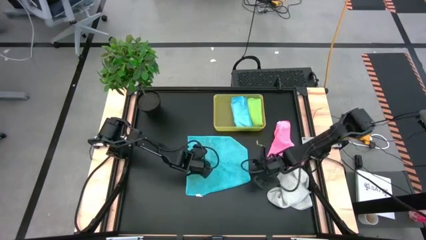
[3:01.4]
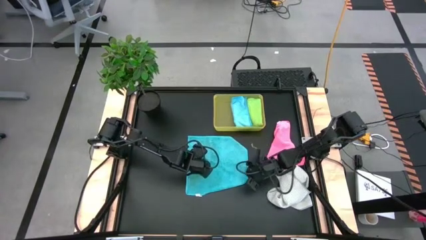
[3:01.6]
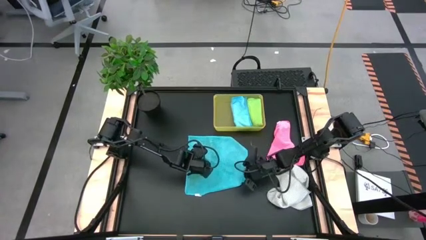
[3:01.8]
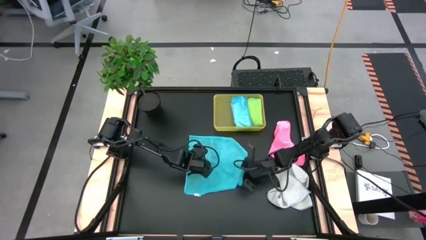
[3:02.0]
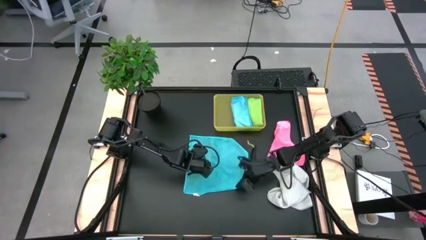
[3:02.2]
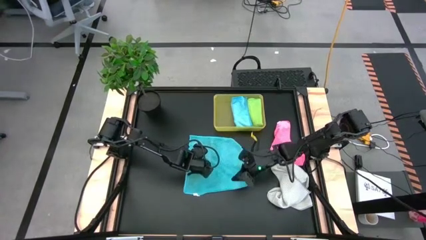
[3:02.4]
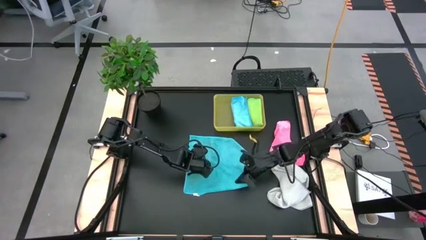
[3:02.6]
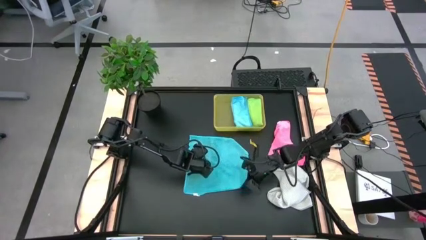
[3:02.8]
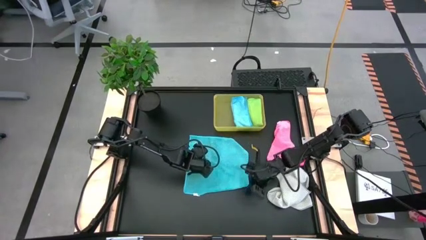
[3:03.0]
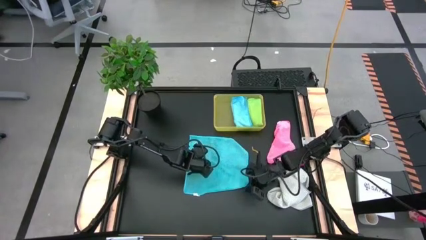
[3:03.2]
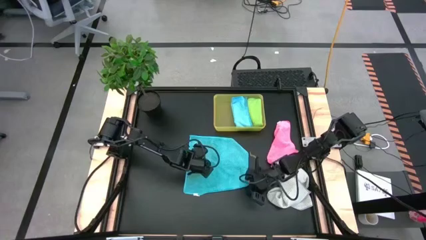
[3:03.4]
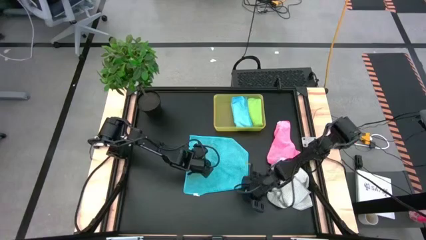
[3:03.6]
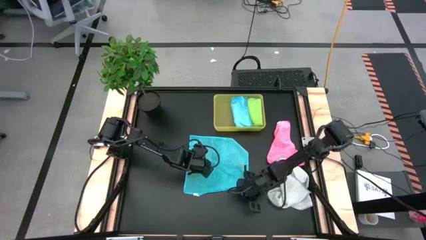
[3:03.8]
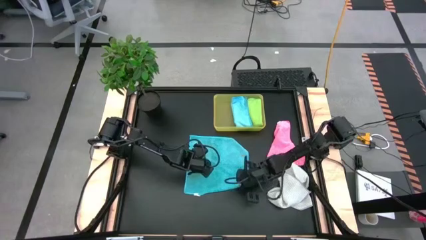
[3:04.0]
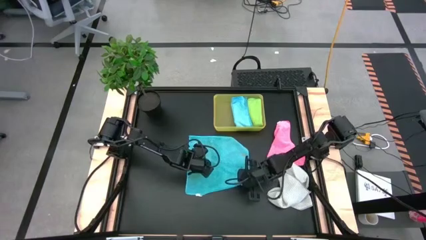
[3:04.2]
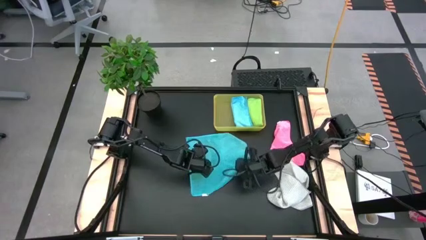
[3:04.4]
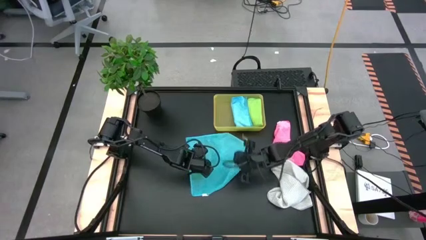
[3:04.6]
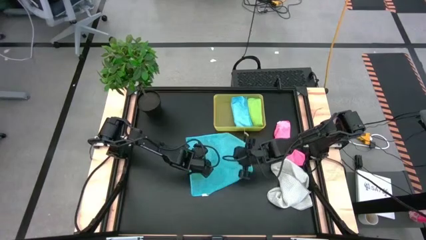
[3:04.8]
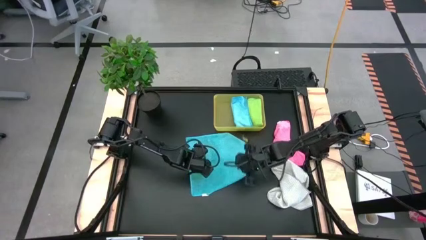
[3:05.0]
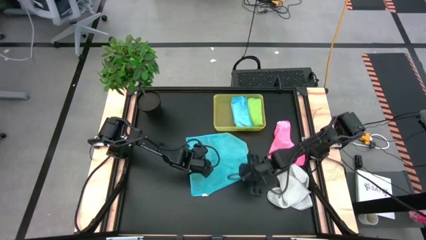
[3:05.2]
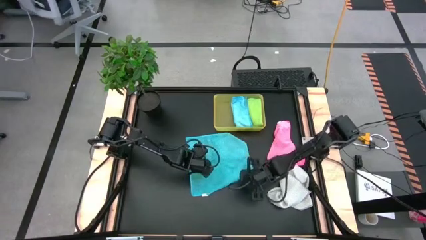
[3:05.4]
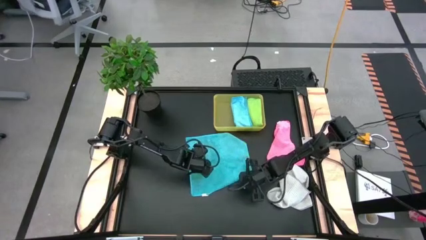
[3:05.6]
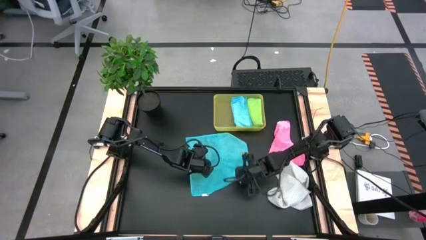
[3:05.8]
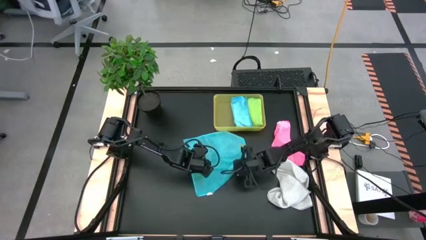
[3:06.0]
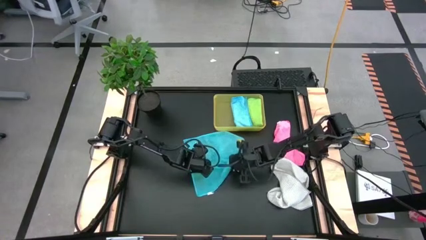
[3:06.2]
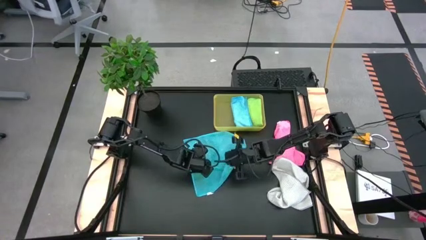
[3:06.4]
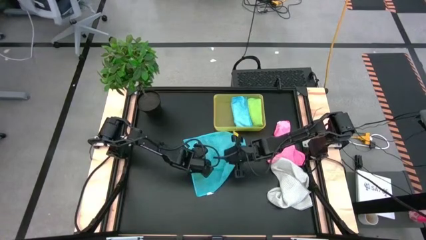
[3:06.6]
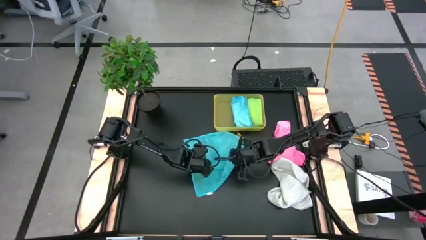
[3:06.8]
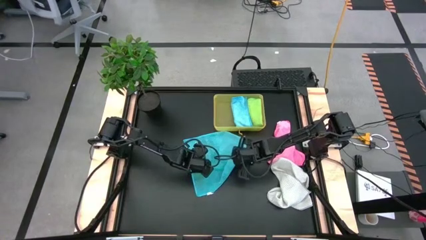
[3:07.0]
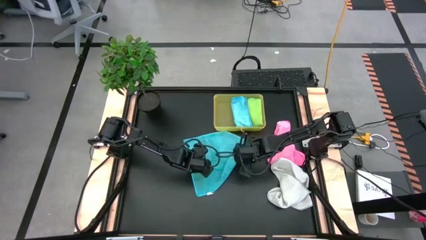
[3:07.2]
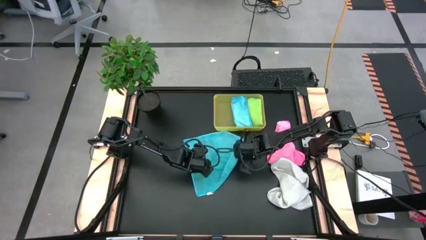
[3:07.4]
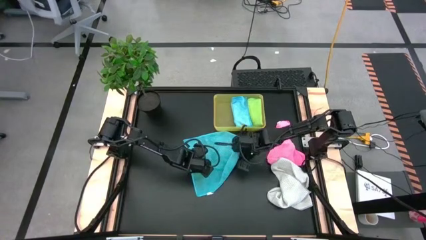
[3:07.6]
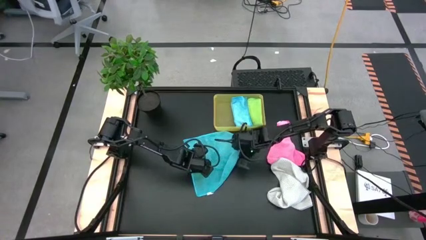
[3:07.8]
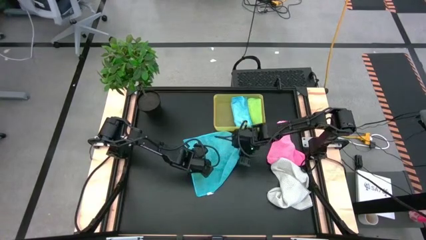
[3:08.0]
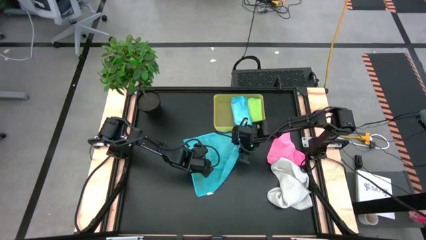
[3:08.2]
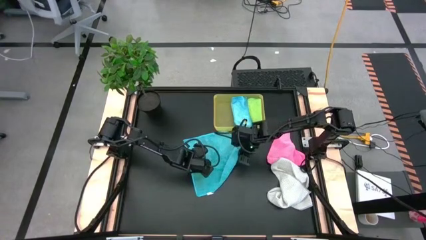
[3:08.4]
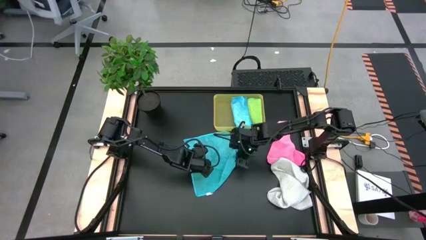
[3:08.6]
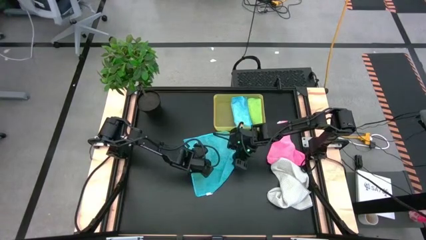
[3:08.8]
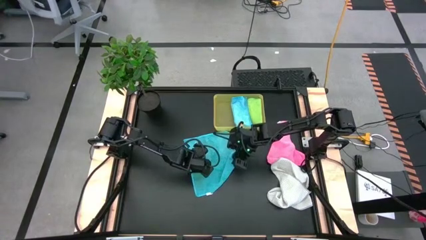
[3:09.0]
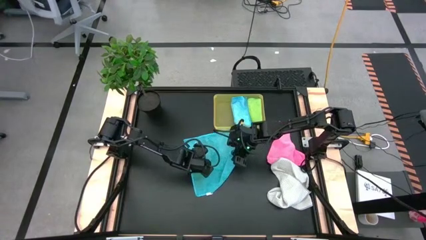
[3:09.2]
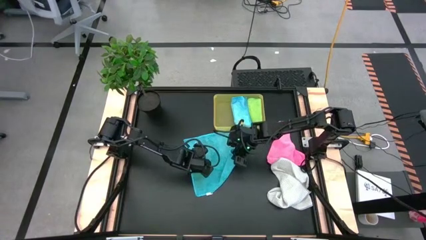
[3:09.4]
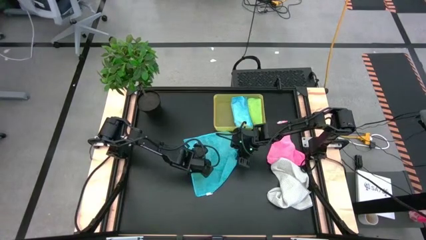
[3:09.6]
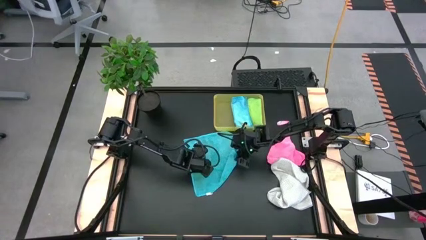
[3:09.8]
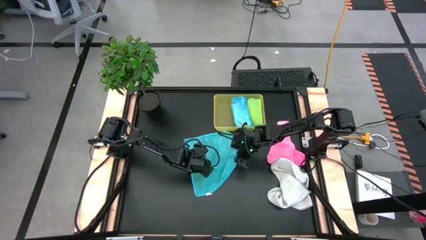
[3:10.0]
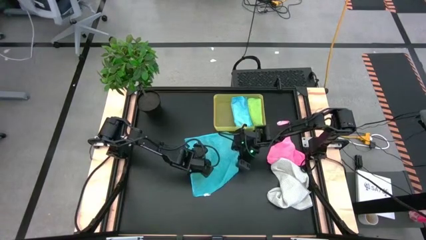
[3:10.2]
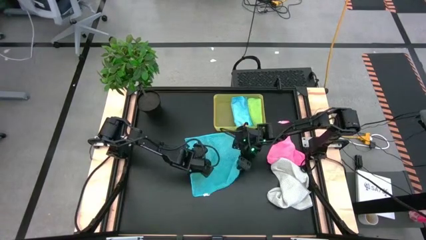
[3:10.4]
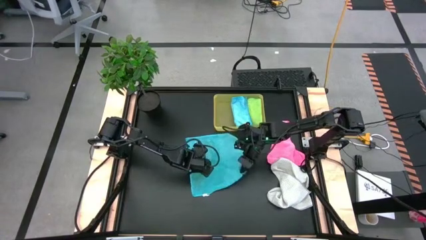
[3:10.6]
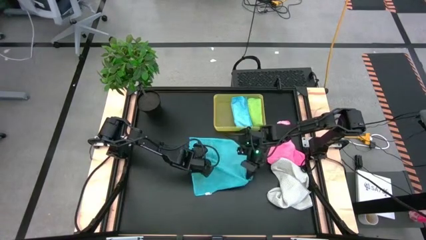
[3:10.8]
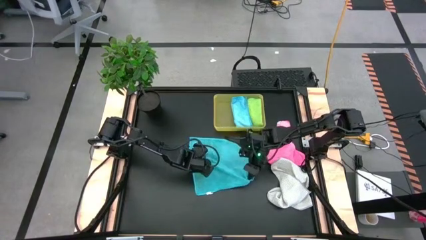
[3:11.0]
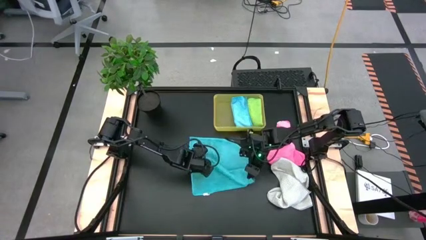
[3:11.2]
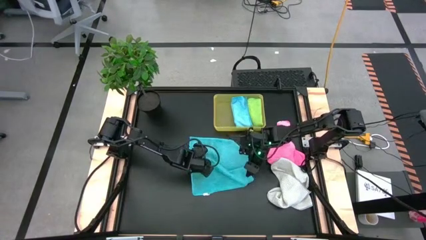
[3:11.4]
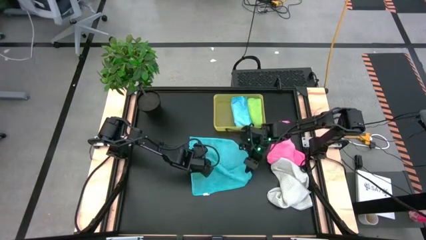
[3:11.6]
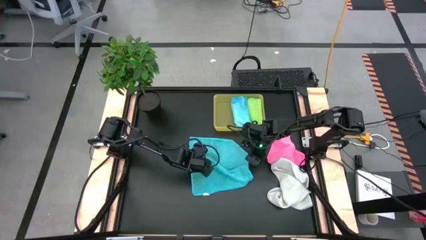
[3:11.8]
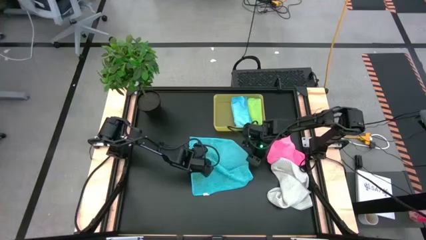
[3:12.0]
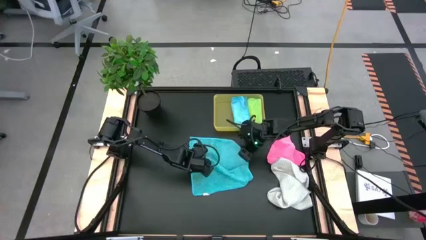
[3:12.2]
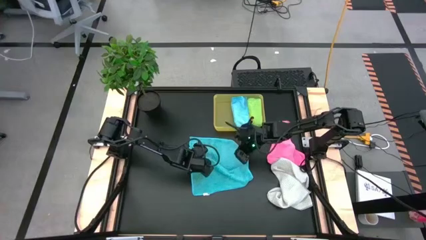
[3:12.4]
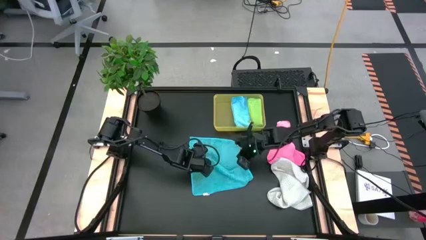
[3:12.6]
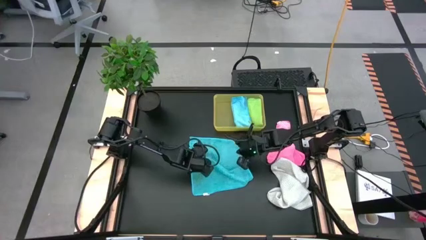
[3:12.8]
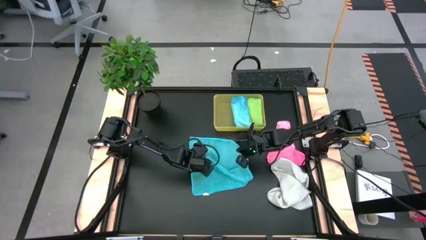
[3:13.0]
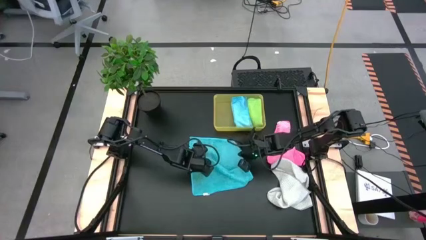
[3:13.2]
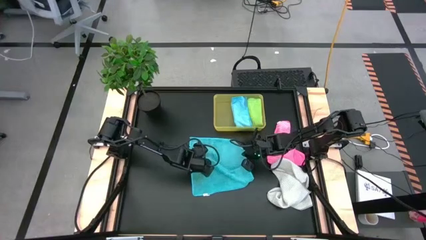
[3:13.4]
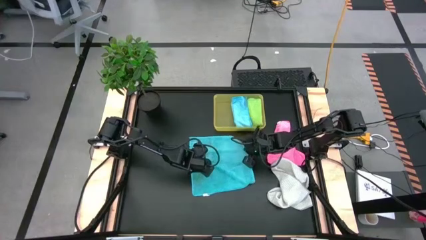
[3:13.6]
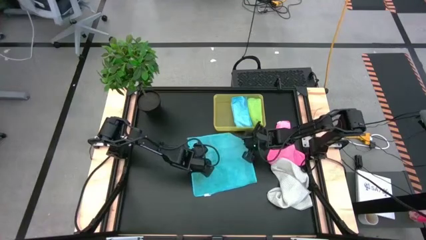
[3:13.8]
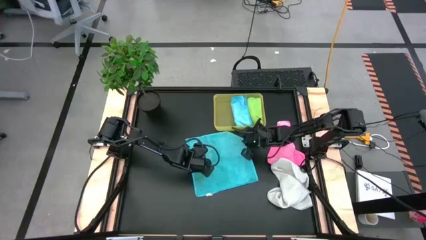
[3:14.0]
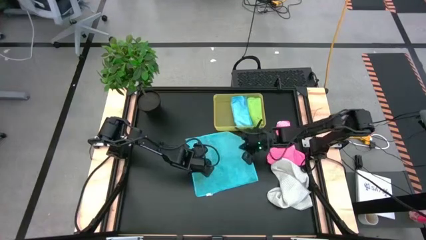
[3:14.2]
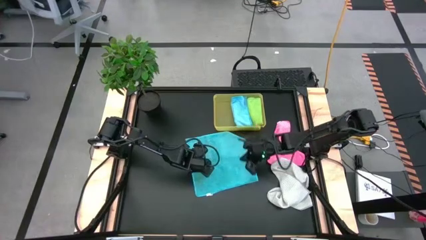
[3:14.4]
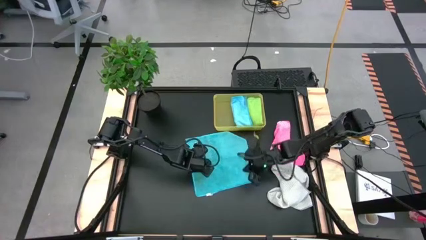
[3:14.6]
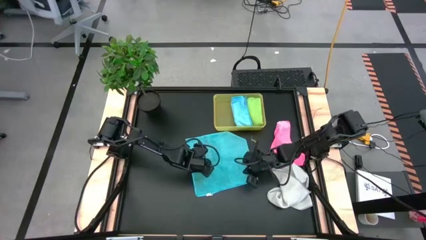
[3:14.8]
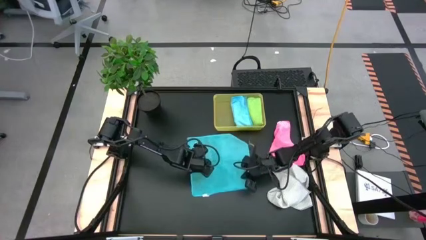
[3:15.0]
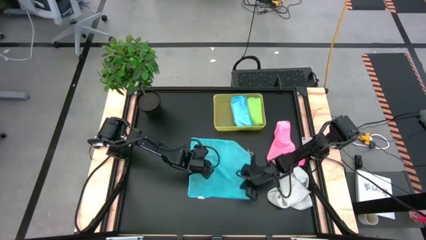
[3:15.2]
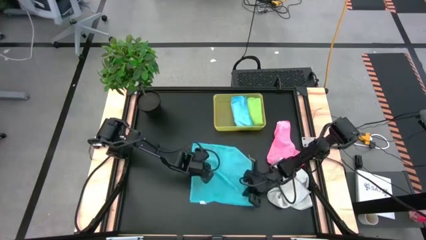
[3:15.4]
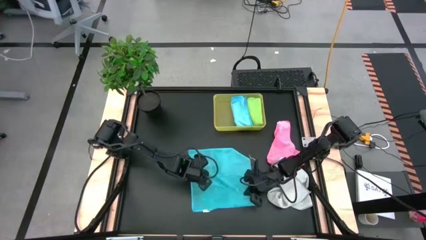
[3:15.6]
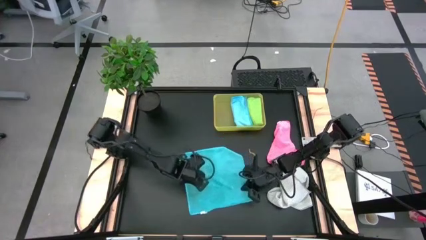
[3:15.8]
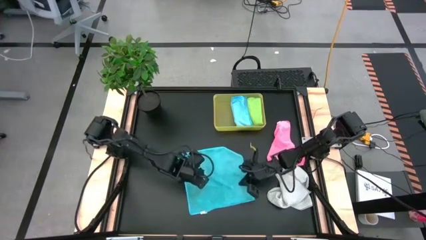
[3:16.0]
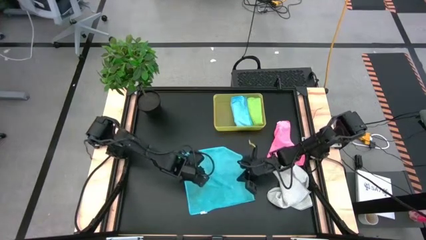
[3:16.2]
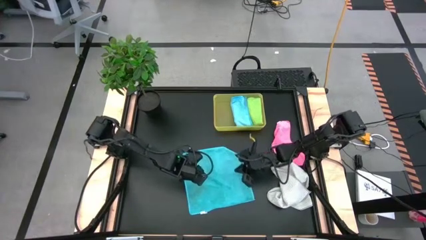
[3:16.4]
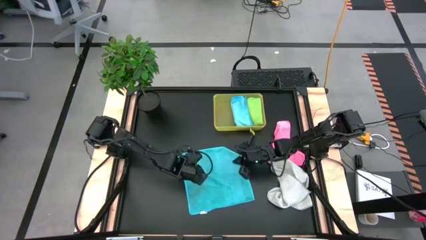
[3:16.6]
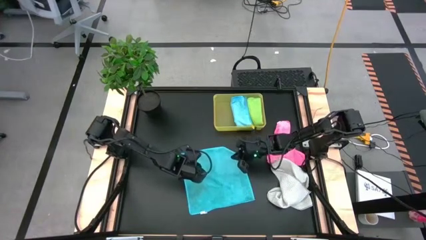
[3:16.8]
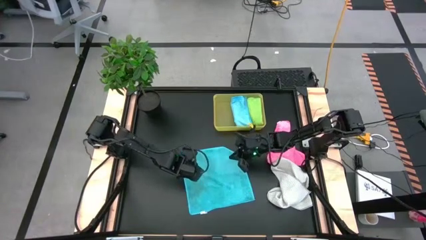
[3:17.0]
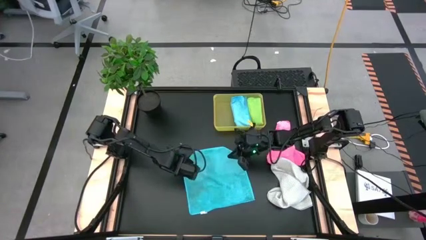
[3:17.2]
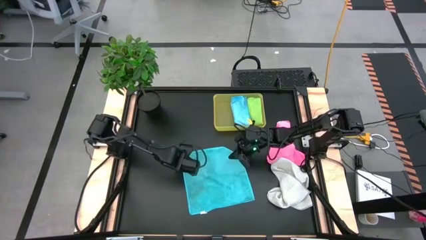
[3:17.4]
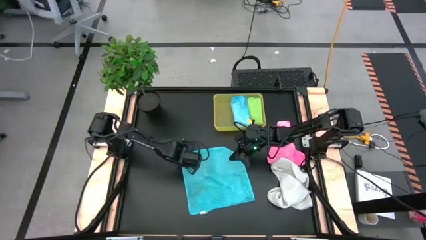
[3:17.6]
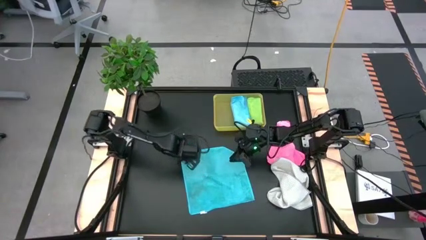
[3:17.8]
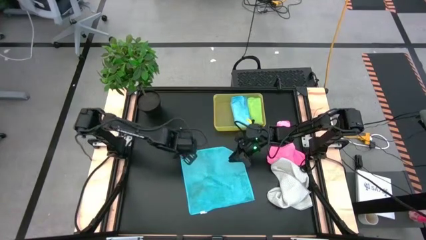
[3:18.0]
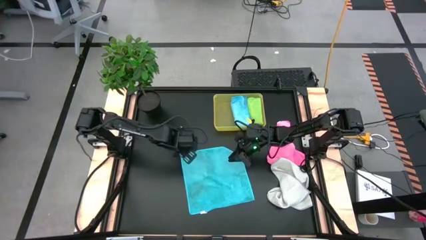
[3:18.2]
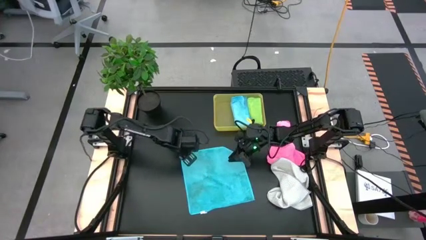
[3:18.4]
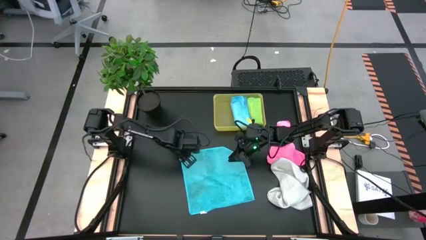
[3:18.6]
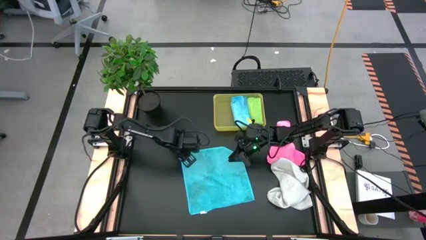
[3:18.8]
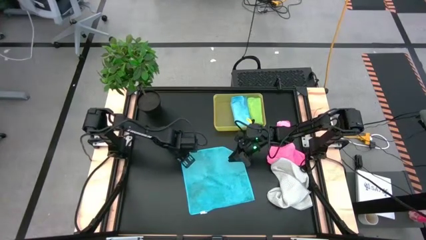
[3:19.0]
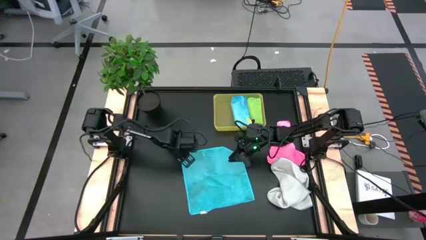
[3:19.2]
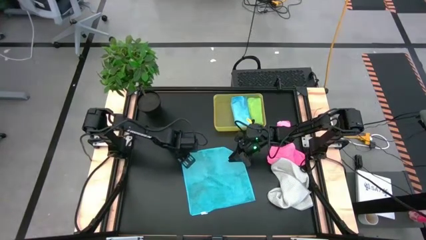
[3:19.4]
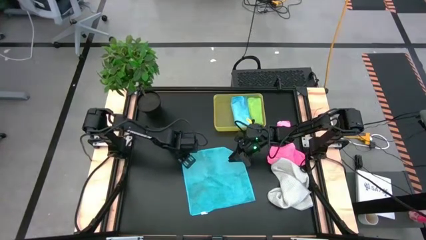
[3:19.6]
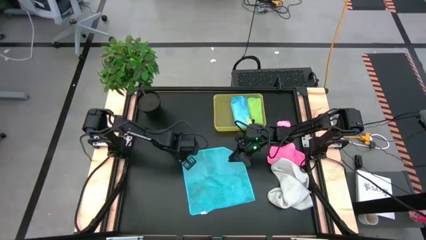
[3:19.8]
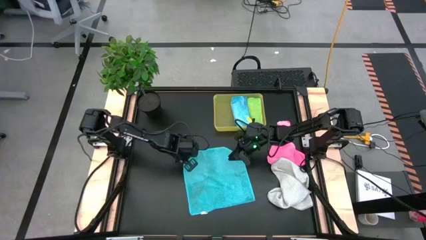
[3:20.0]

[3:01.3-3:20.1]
Task: Fold microfiber towels
Fold the blue microfiber cloth
